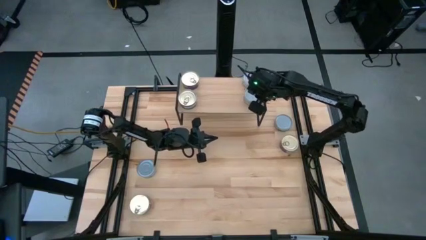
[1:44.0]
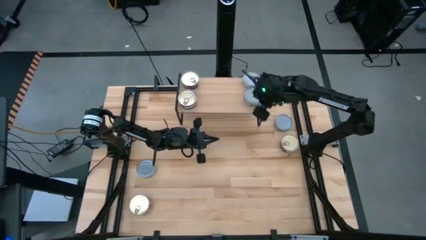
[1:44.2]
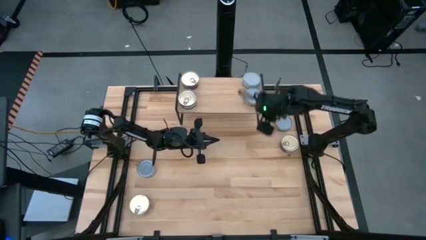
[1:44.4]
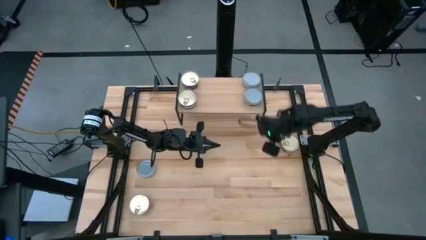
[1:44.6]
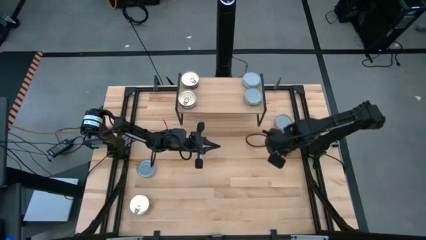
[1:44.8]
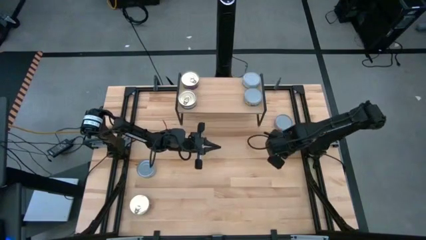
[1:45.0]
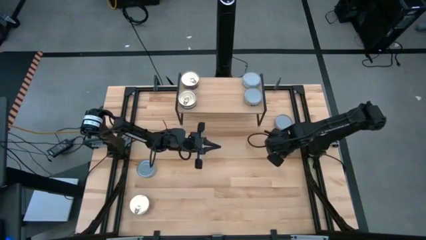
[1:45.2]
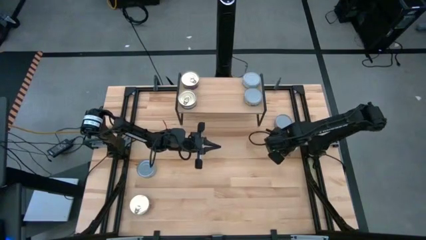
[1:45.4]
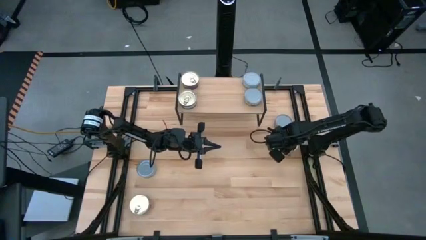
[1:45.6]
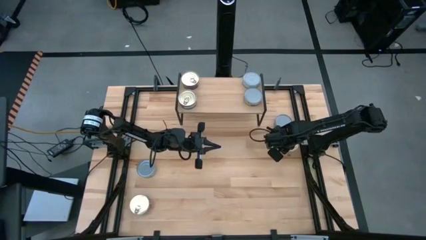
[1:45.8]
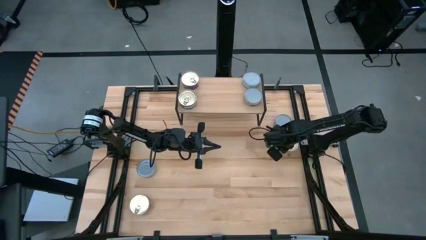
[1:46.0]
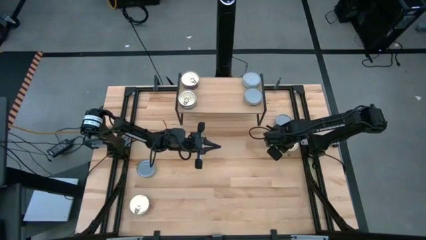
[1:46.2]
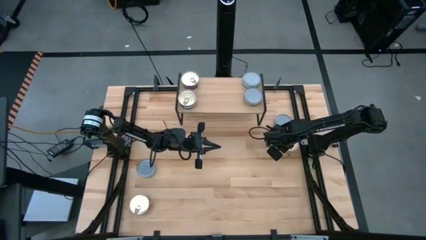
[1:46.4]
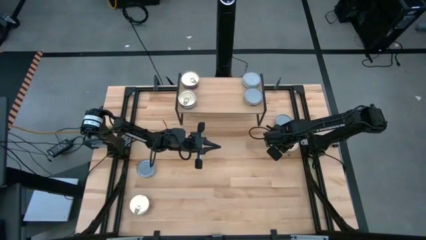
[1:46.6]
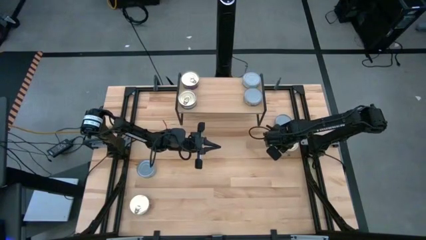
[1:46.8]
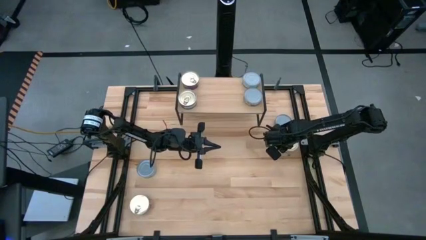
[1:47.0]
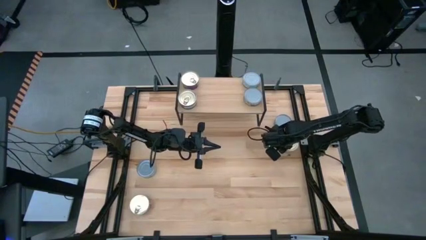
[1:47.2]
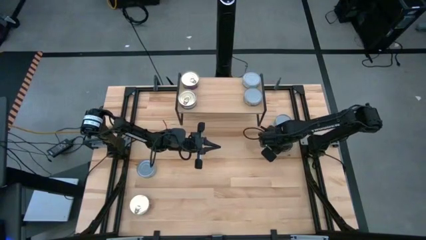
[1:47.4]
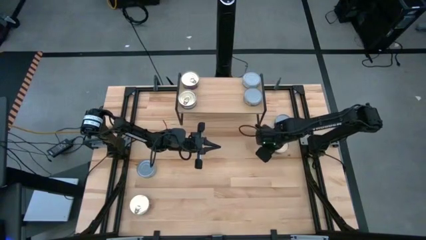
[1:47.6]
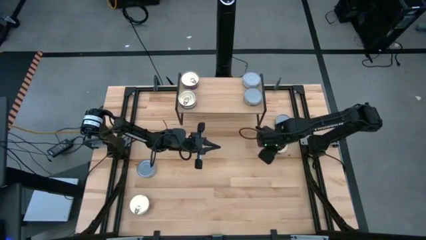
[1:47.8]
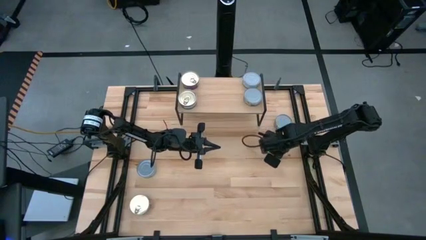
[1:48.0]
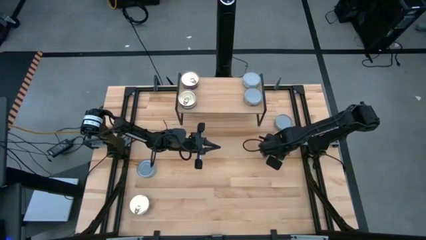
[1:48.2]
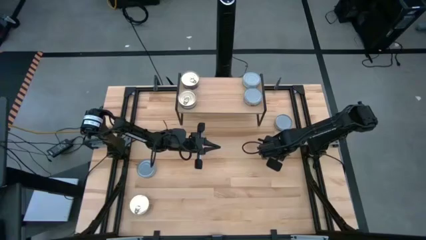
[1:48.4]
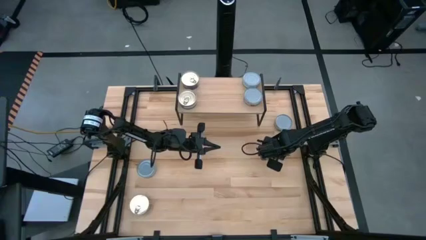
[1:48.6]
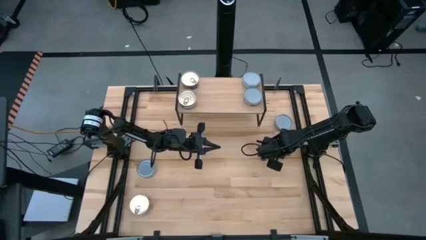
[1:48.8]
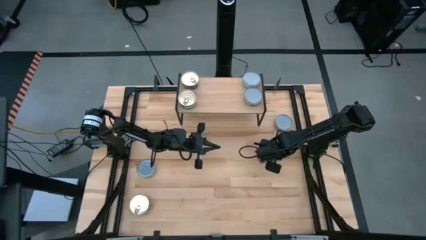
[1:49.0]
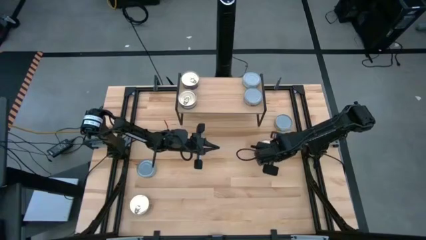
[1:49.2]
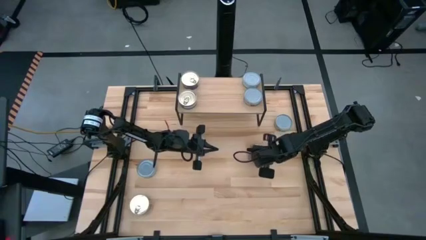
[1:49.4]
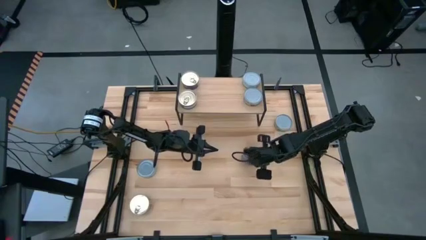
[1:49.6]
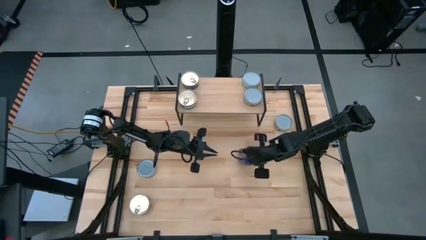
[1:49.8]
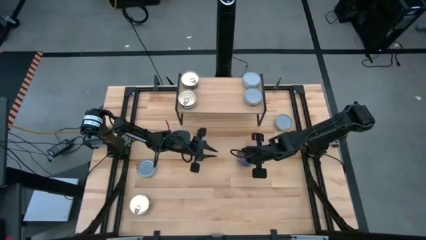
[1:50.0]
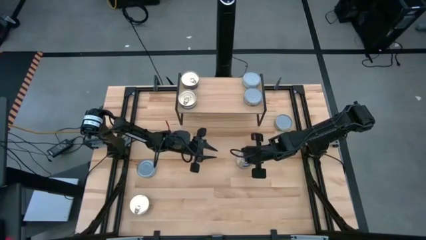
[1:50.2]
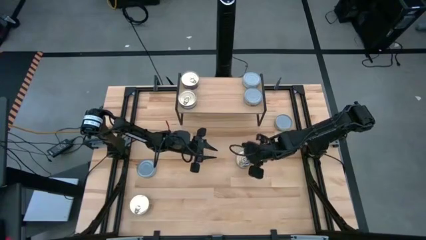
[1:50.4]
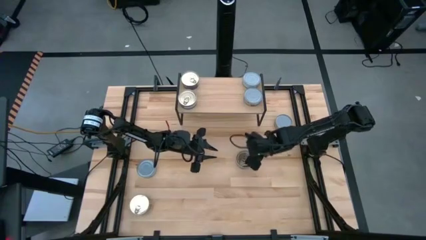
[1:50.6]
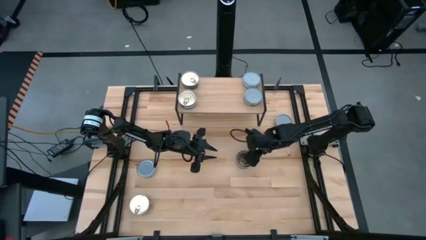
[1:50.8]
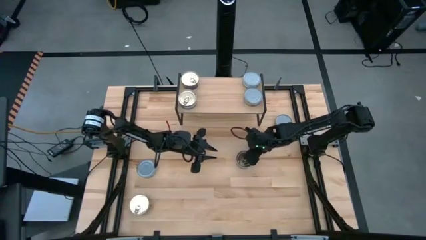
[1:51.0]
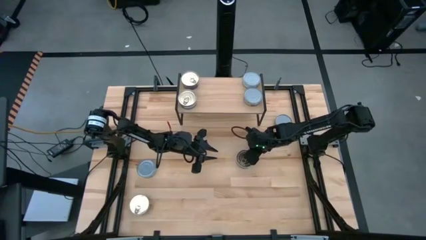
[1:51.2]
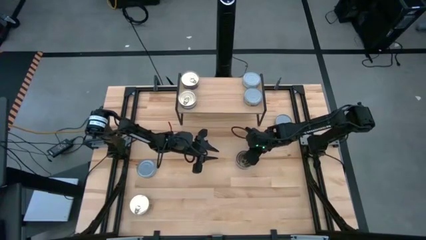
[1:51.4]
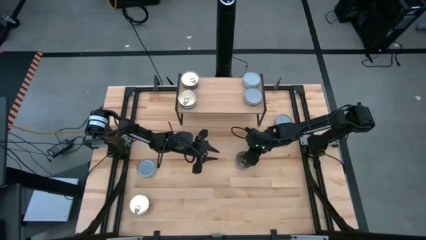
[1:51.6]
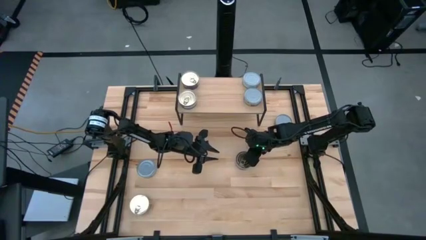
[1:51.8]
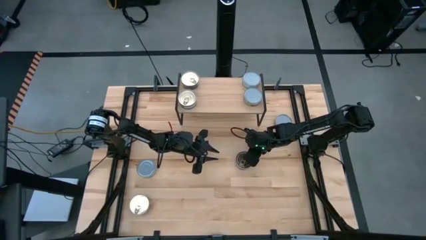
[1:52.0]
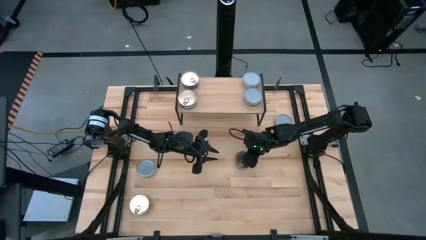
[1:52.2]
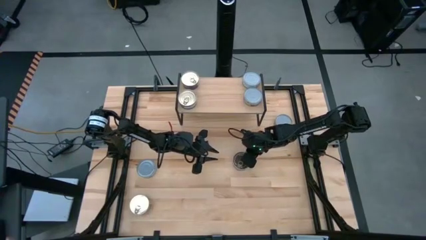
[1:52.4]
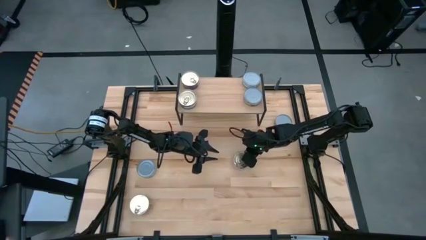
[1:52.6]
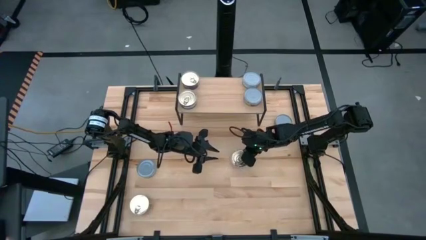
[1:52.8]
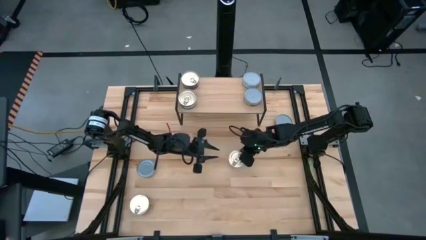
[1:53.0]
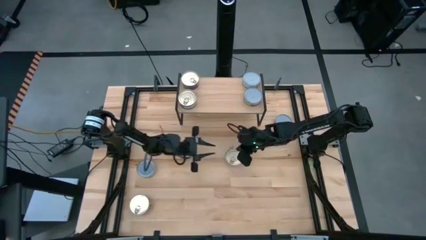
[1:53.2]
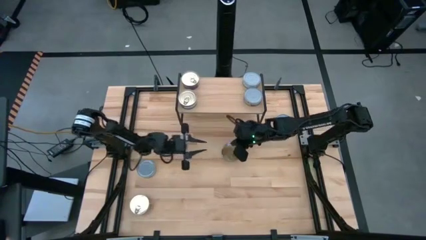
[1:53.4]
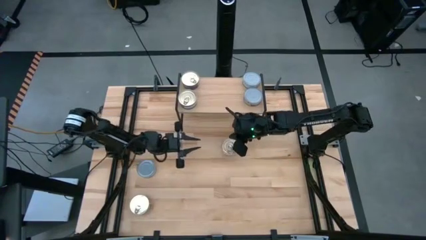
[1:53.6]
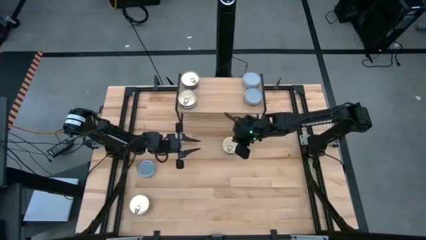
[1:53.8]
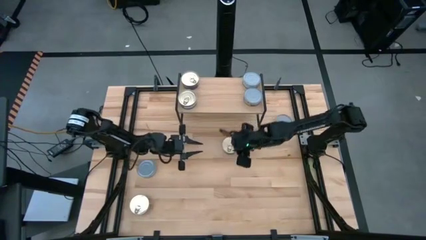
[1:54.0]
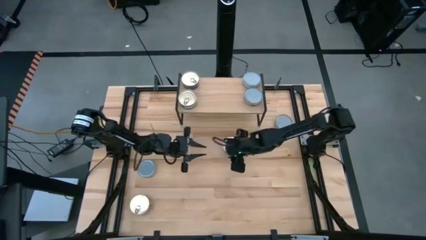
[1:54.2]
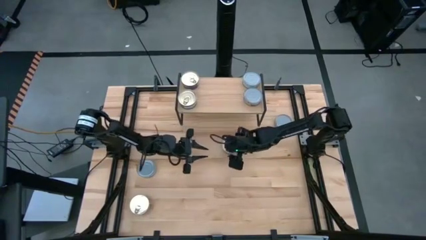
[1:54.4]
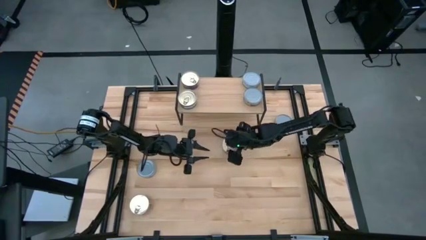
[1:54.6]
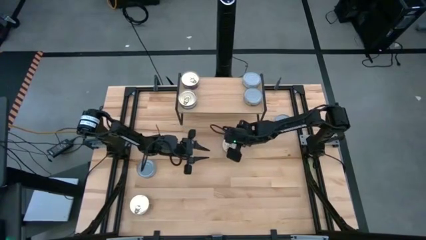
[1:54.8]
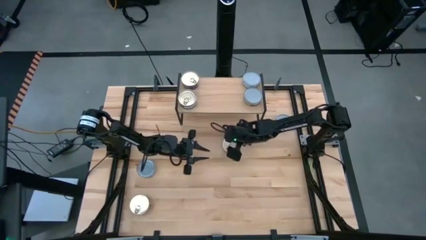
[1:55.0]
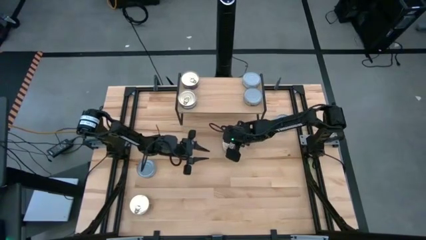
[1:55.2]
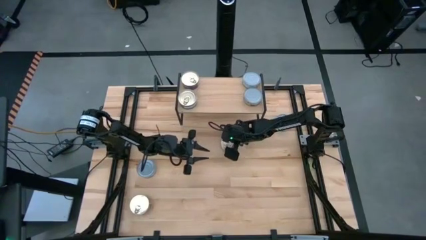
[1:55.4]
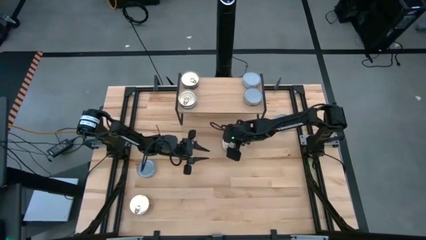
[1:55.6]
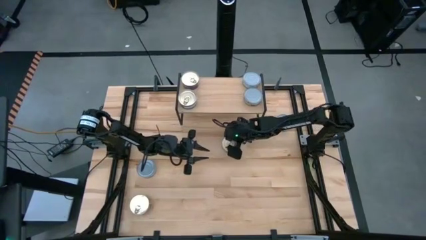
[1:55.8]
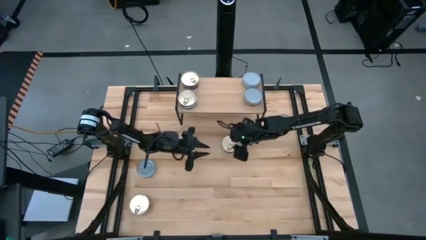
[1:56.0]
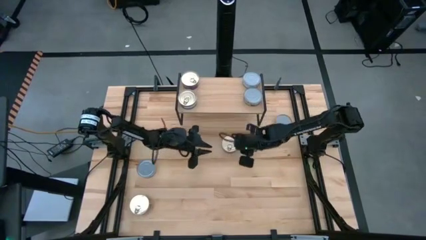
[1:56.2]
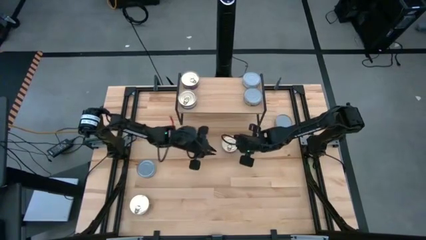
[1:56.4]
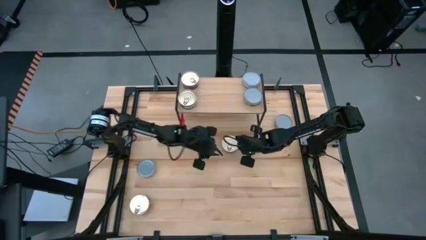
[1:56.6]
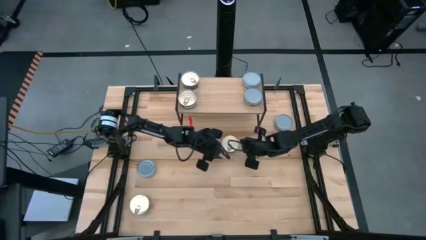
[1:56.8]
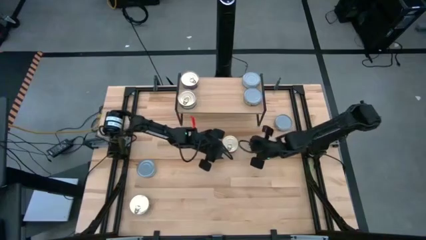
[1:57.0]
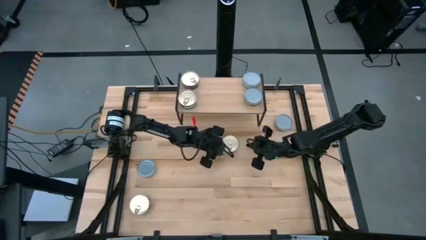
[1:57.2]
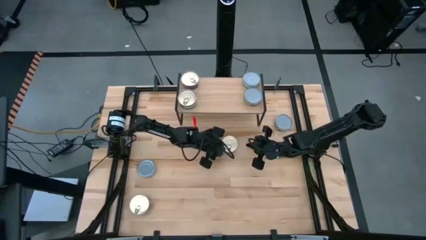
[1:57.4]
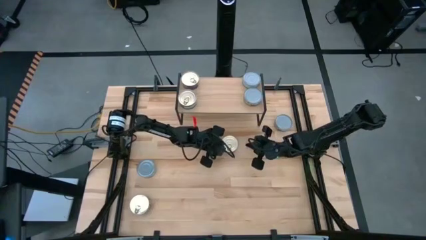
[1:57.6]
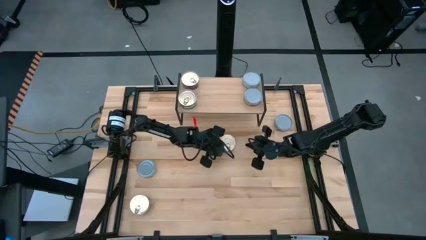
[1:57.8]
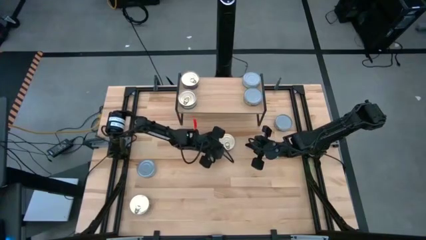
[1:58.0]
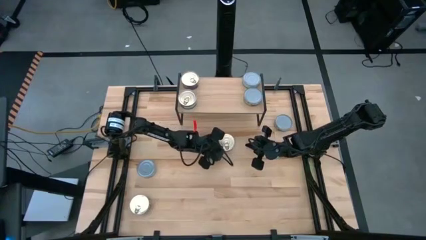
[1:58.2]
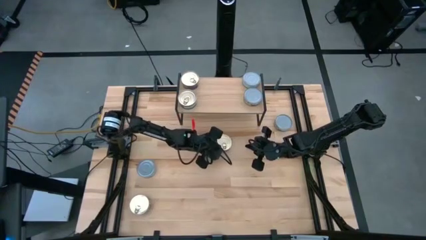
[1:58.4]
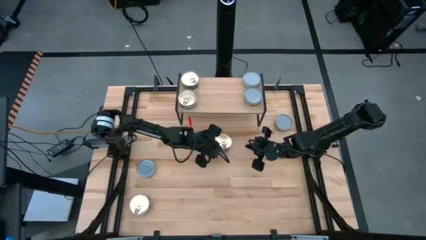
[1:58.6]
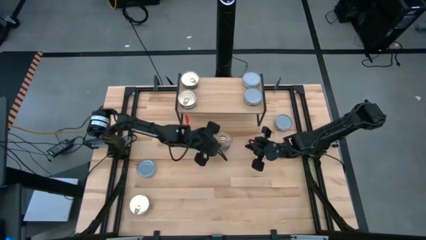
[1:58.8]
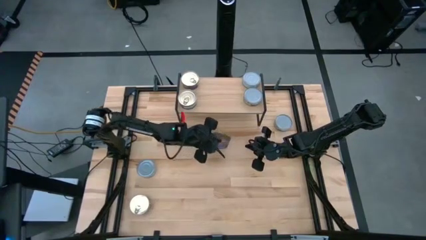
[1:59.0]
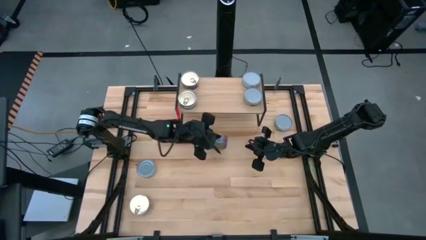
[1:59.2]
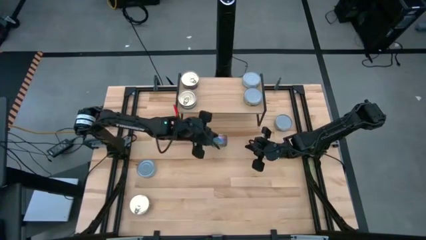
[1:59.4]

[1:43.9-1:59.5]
Task: Stack canned seafood by type on shelf
Put the top blue tuna can on the shelf
